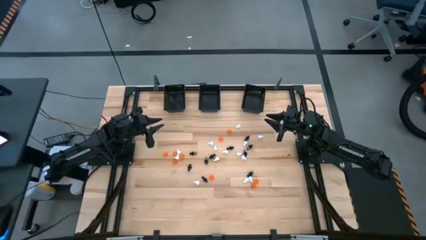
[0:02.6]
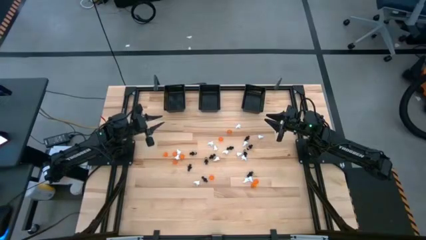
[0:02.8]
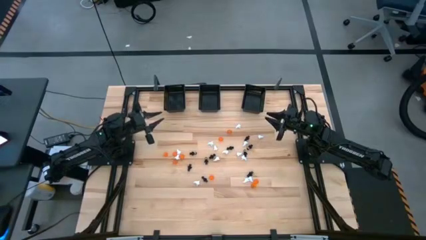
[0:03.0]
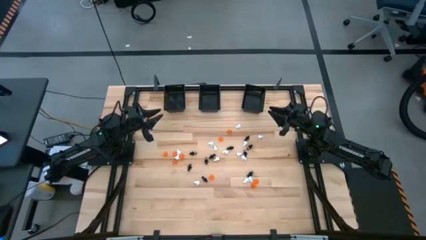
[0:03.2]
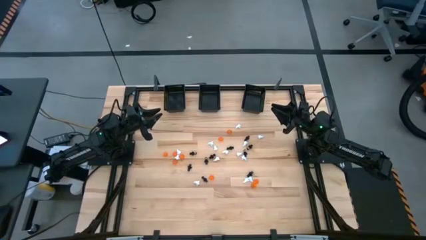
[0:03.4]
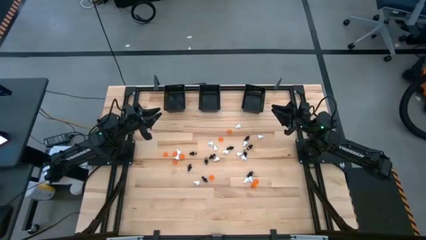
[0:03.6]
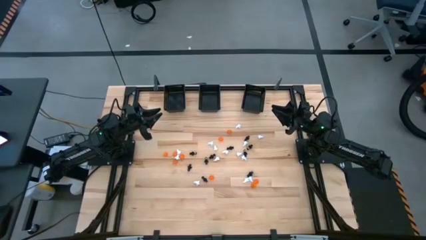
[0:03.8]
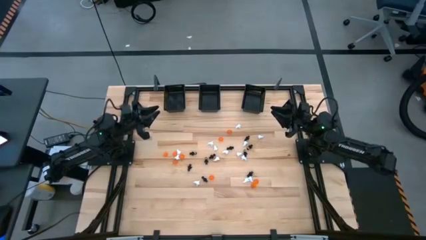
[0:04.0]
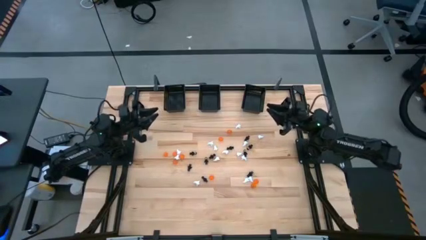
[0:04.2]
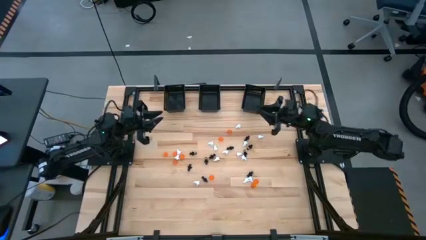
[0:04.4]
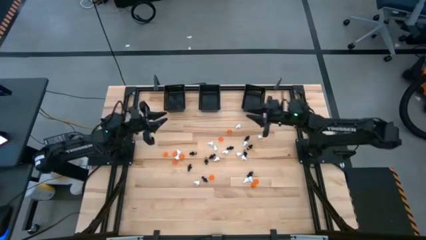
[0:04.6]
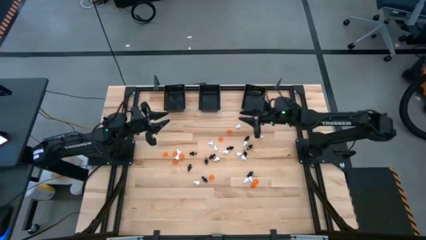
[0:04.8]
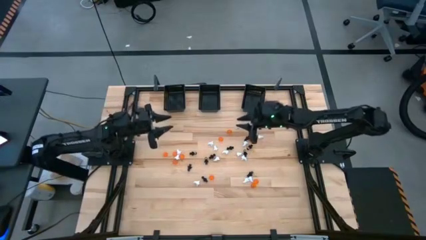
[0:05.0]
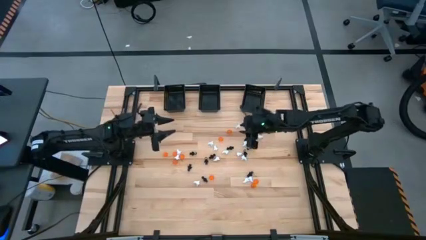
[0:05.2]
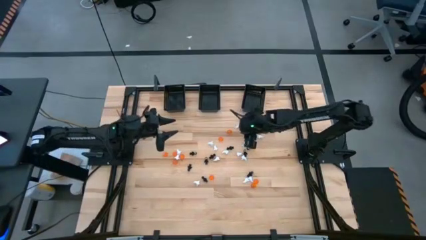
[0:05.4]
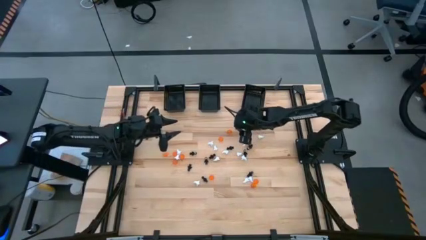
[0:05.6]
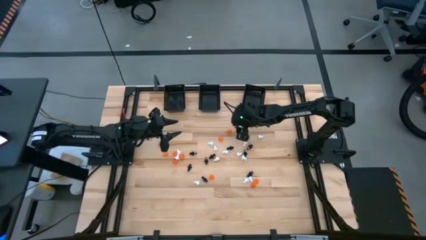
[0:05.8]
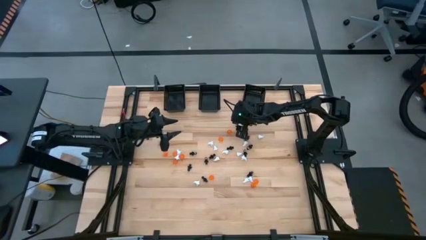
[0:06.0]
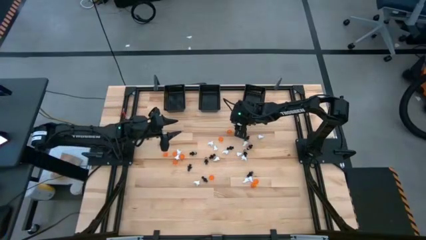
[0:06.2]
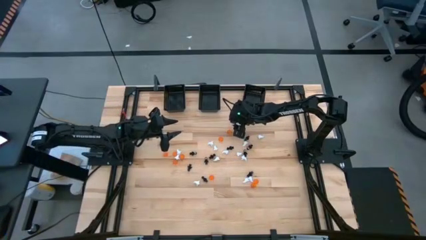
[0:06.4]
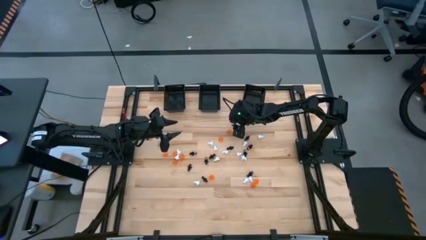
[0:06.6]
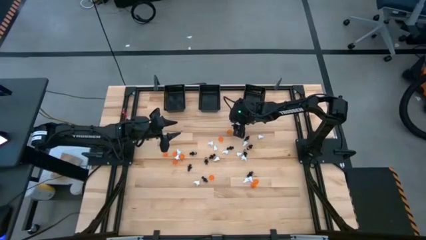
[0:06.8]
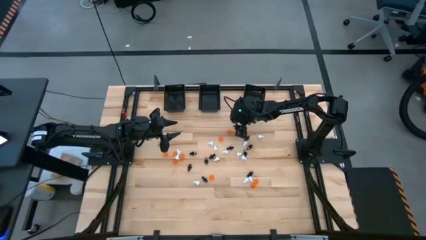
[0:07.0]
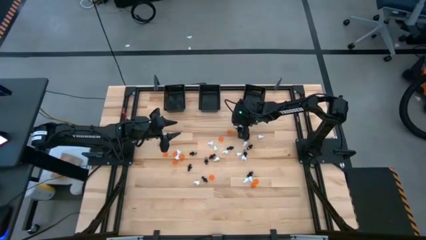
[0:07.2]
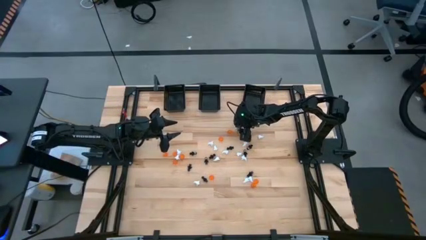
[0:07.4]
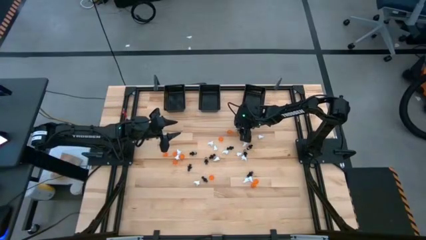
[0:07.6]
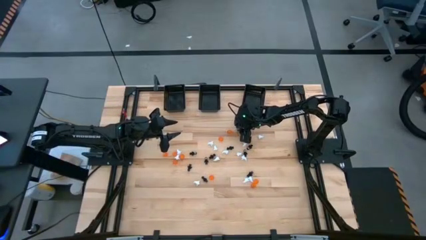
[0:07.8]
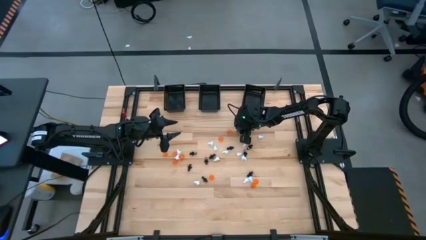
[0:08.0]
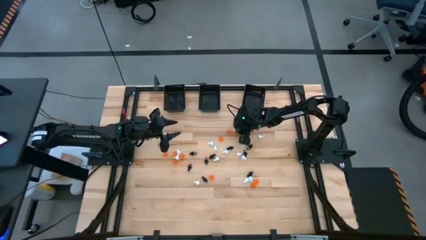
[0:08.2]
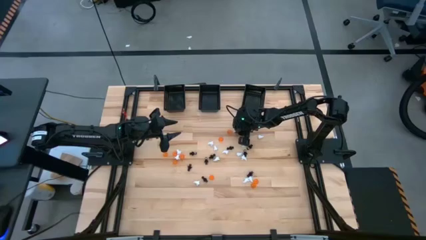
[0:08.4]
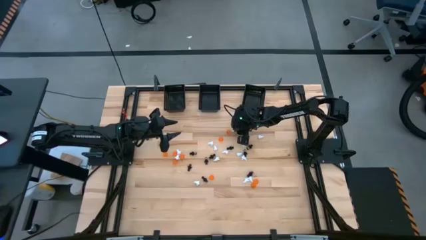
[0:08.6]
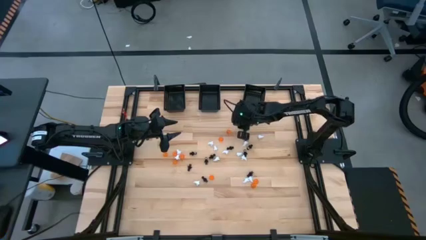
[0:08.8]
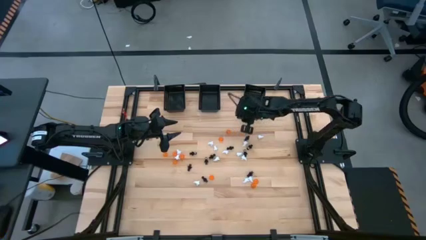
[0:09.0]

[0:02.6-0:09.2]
Task: Sort Halloween decoration
Put the white ghost toy into the right black basket

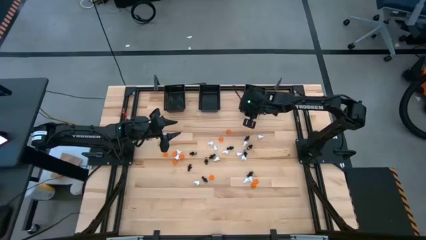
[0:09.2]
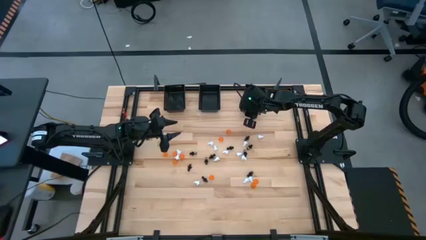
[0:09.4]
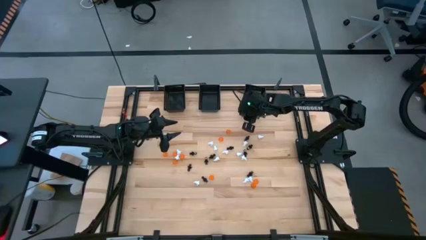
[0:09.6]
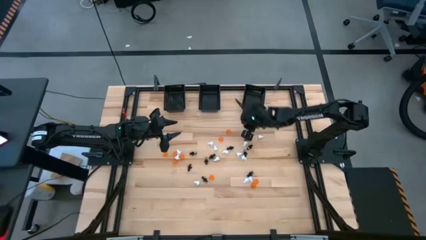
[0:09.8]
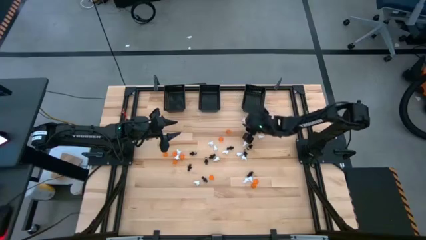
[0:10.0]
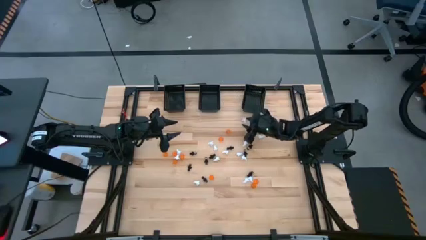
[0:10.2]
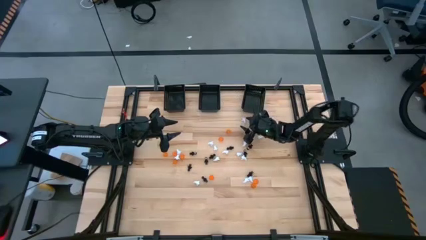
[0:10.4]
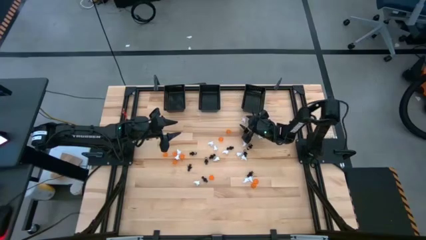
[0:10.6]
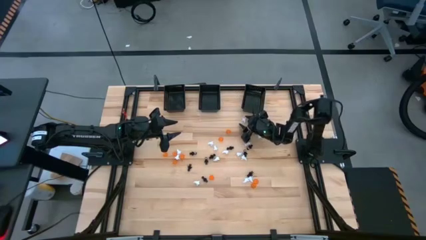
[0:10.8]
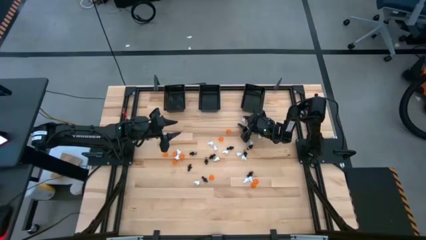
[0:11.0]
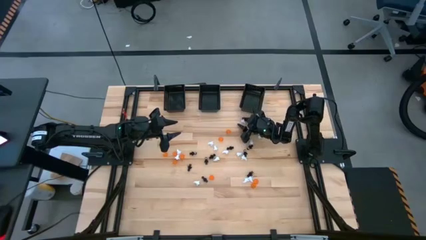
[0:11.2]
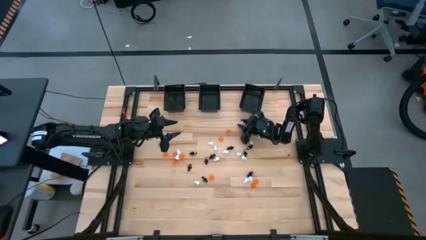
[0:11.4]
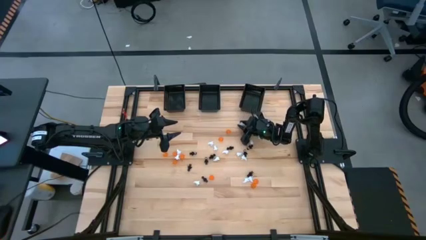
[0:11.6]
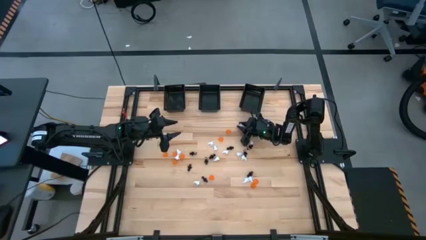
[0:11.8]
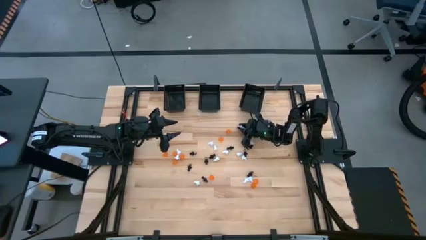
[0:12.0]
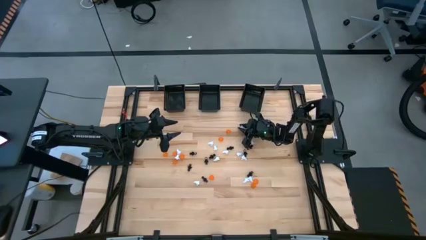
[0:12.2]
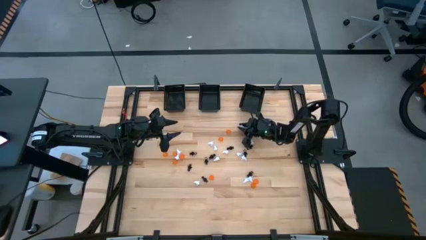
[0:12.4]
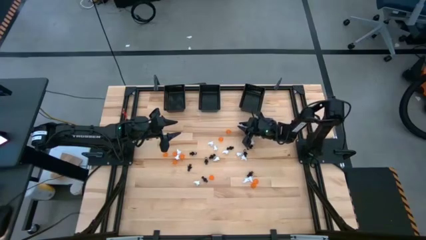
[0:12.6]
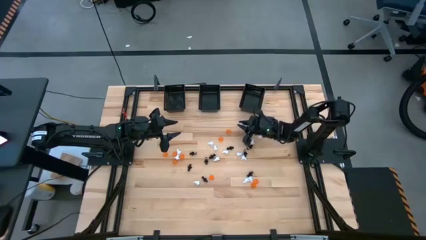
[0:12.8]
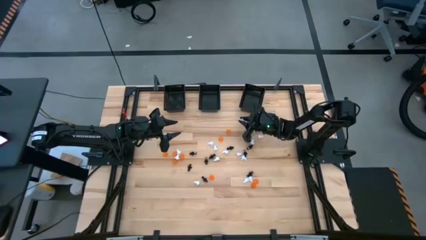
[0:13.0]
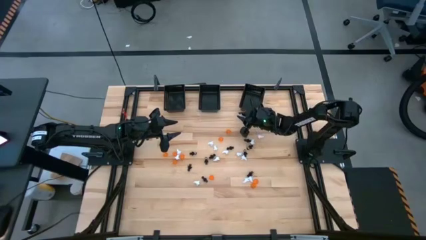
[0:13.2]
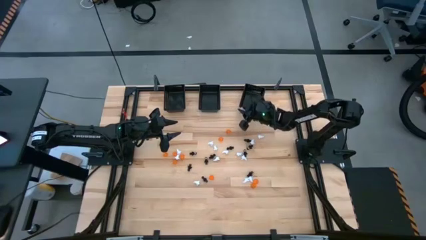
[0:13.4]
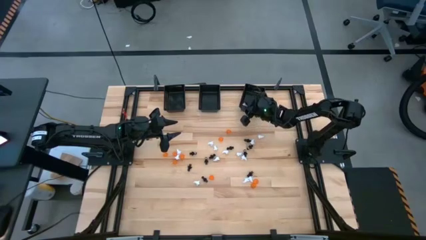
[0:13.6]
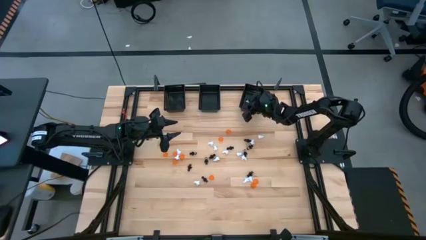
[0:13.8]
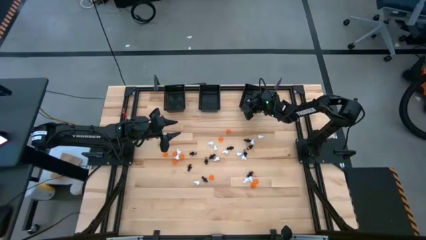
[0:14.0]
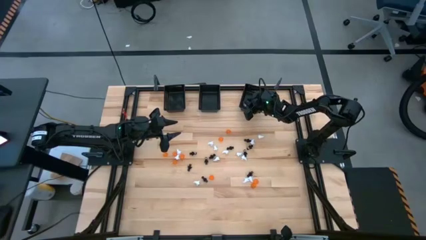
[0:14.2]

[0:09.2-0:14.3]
Put the white ghost toy into the right black basket

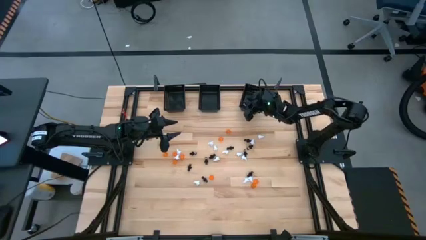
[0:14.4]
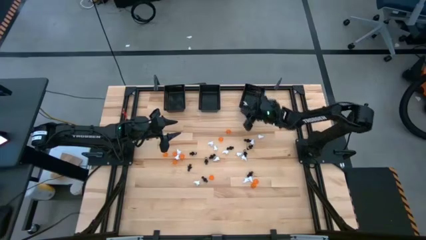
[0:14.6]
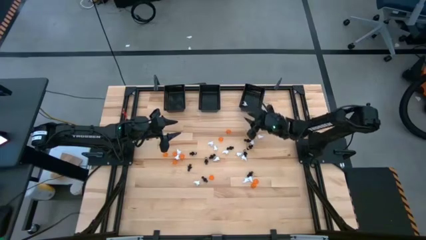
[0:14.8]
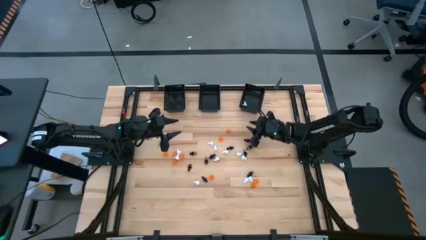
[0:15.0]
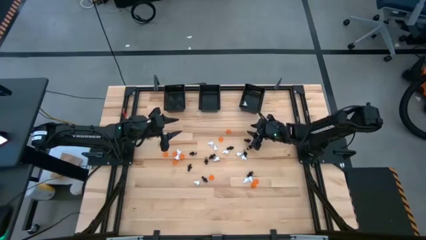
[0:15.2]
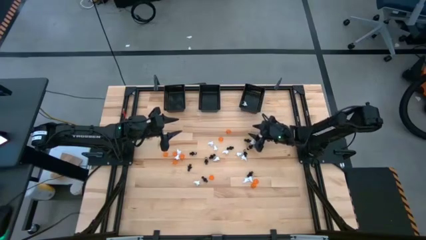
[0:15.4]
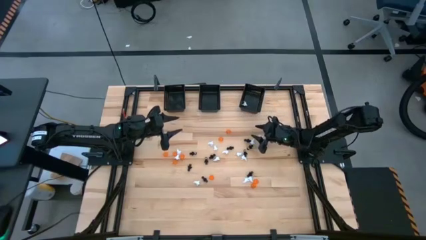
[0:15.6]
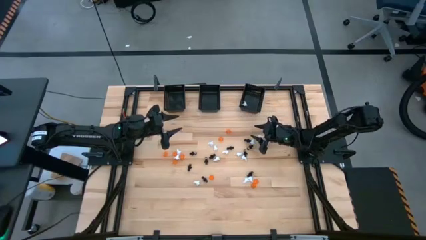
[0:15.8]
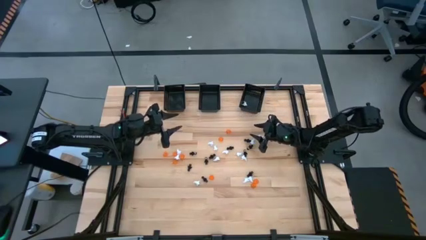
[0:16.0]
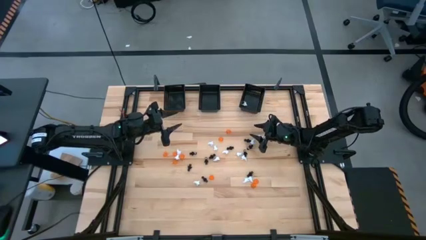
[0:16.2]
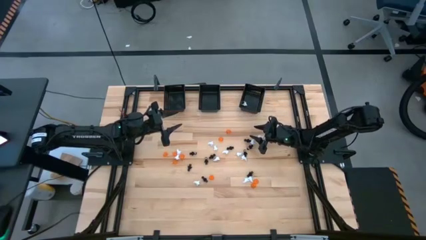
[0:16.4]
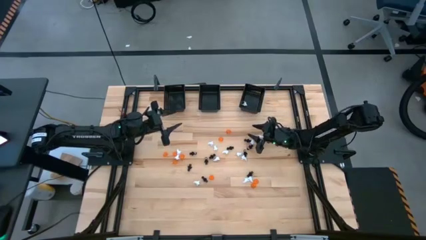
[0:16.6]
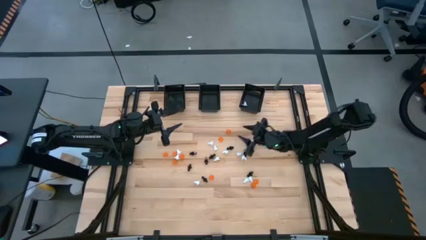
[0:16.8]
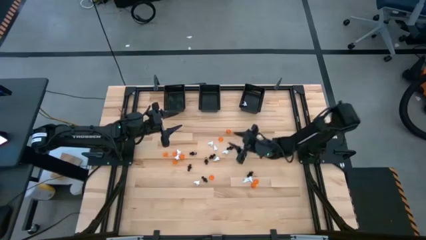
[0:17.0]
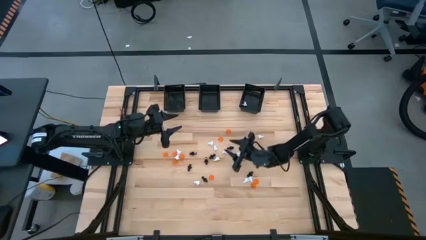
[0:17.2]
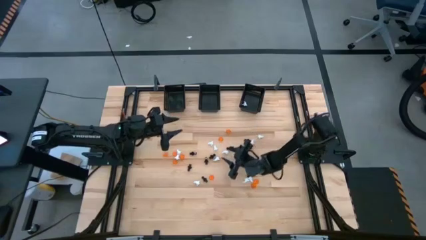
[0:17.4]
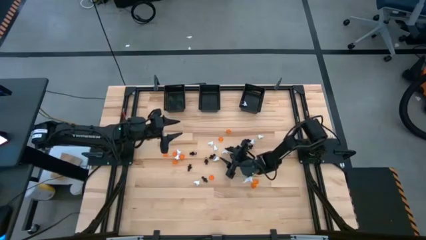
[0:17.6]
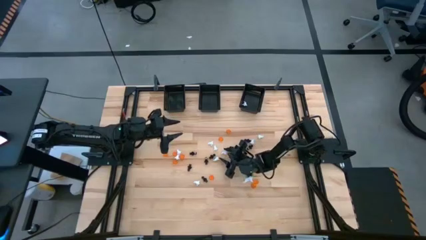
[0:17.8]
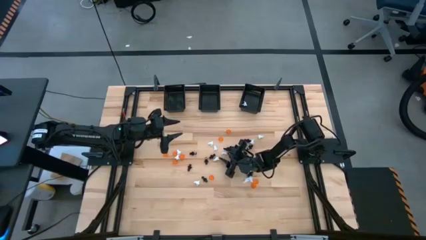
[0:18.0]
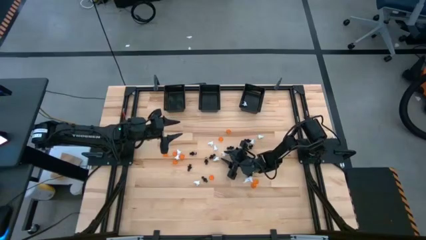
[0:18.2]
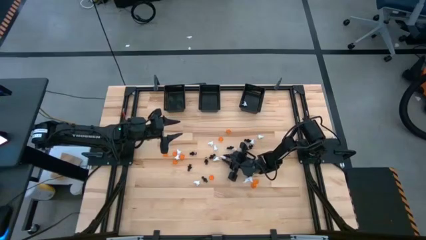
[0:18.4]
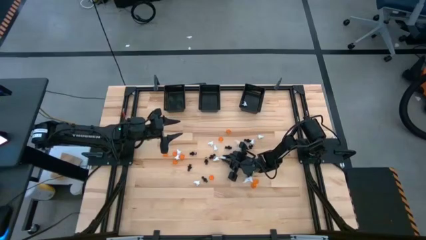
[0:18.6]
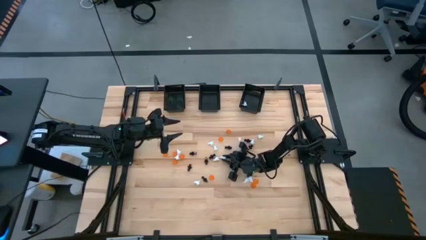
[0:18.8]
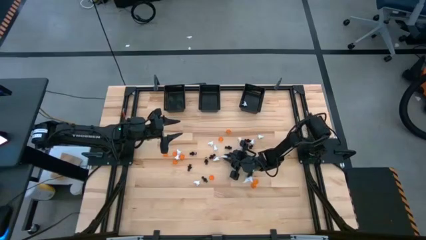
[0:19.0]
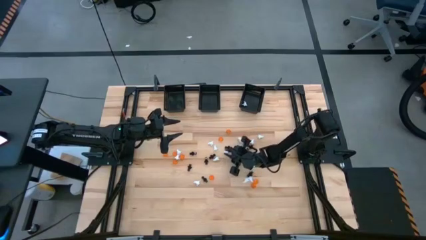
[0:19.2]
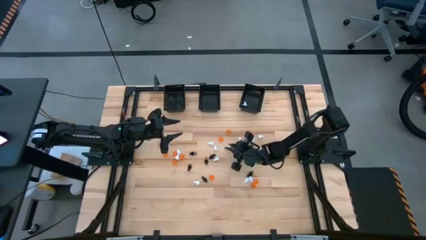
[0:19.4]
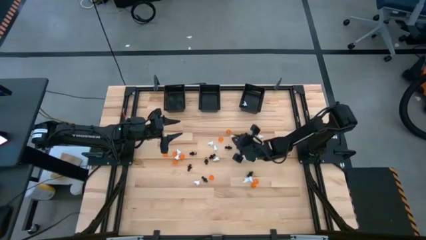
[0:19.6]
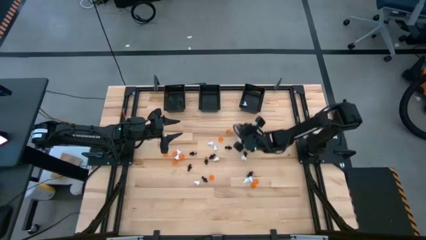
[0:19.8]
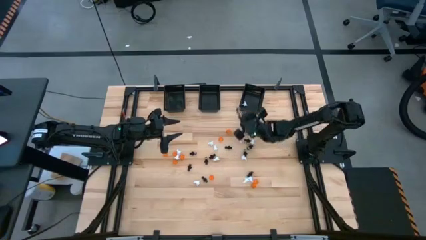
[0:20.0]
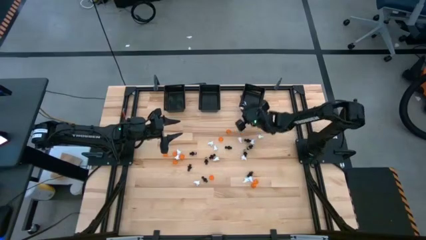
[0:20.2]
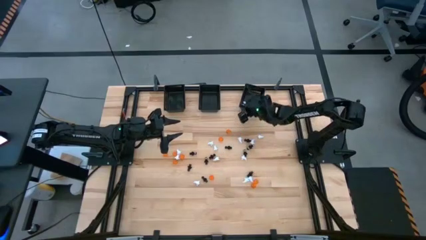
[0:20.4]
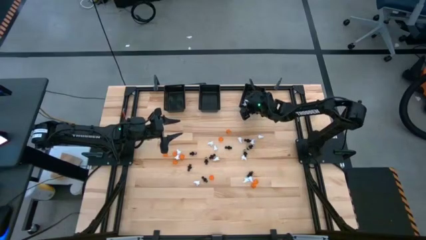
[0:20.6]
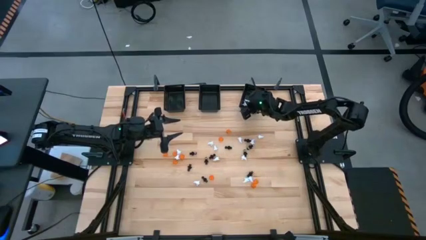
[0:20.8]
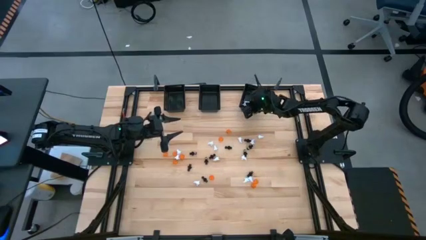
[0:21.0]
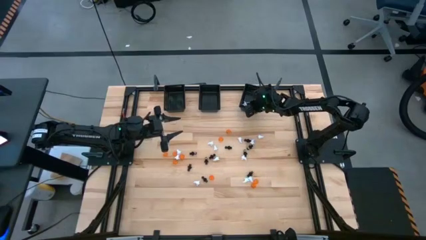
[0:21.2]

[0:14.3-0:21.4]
Put the white ghost toy into the right black basket
